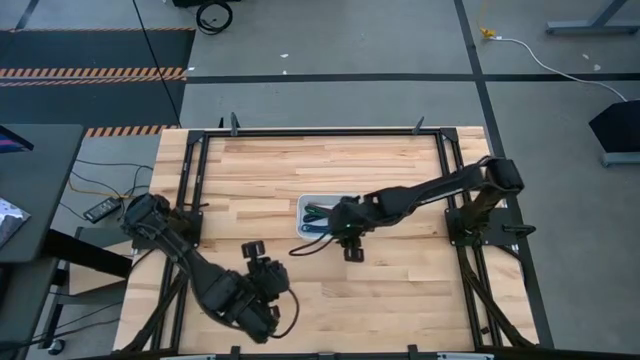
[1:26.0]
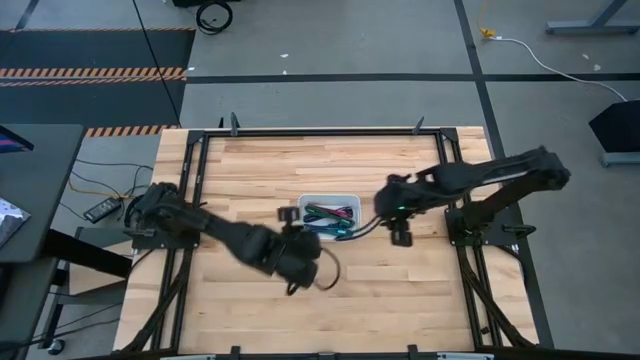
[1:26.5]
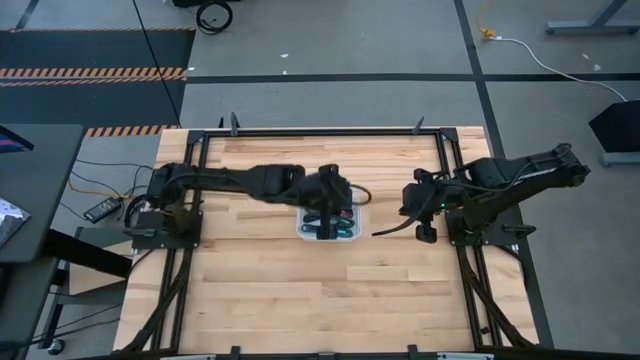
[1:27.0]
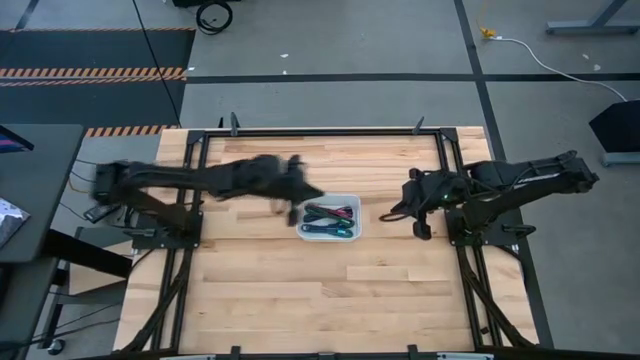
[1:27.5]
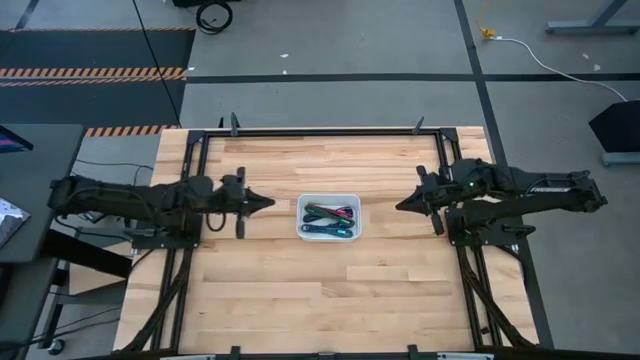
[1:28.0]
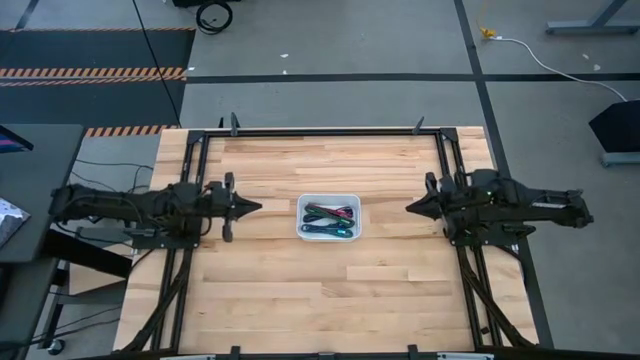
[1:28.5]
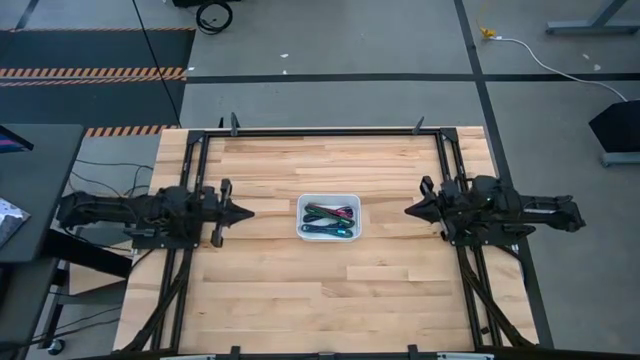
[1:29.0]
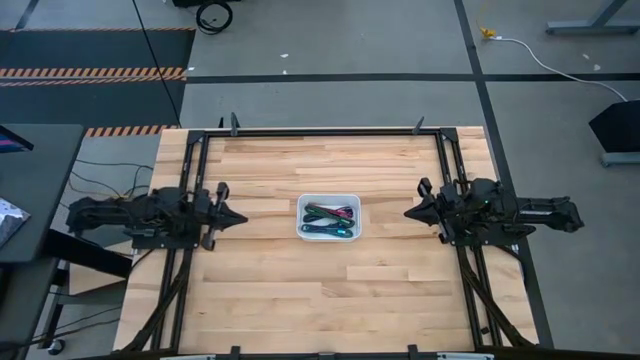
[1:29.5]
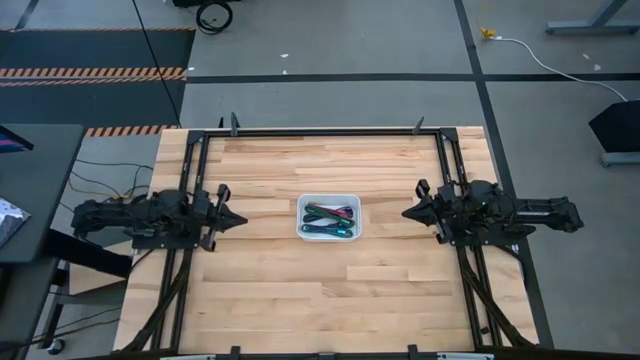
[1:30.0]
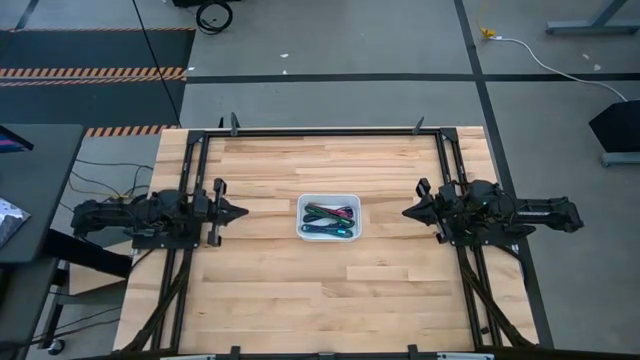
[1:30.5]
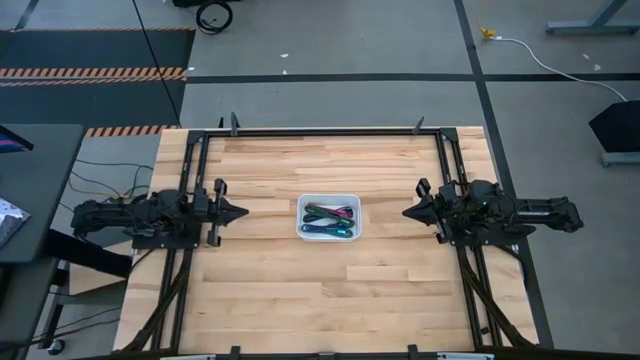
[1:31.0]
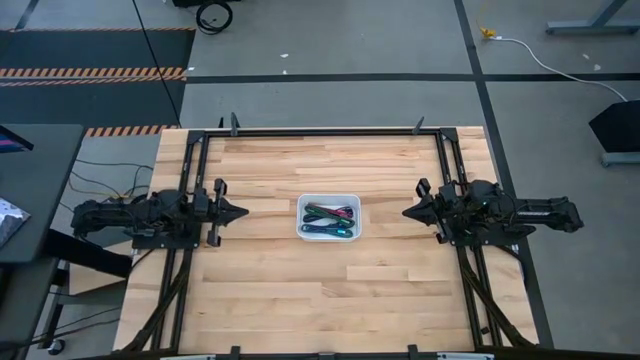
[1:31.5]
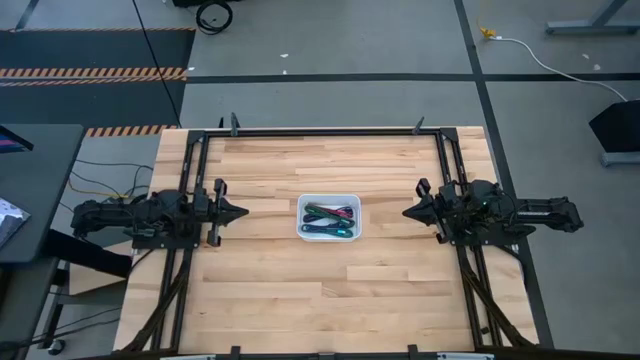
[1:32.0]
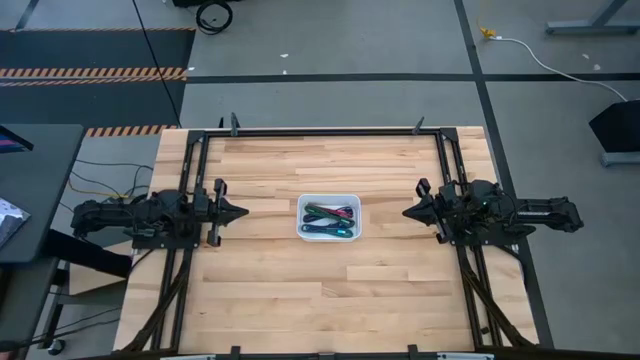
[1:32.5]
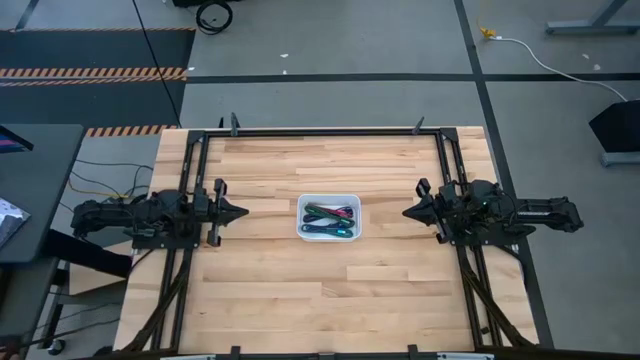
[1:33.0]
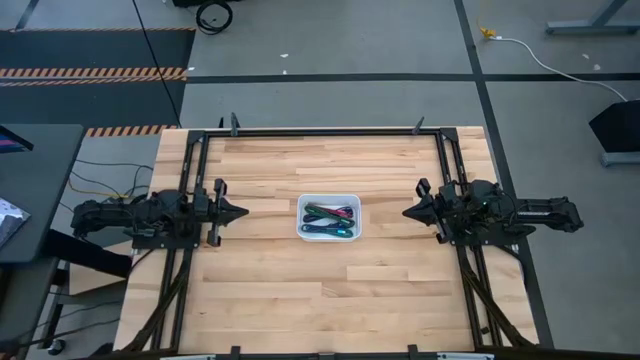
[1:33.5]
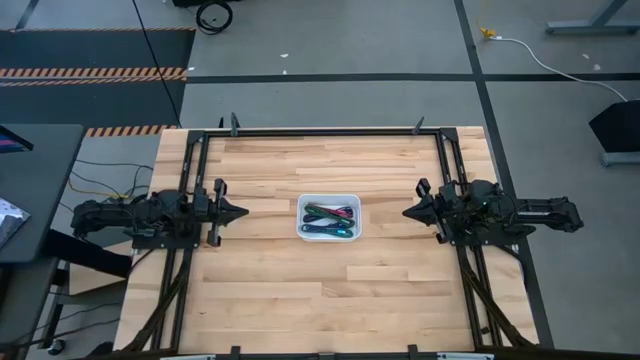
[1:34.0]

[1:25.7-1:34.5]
Task: Pick and place USB-C Cables
Return to Home Position

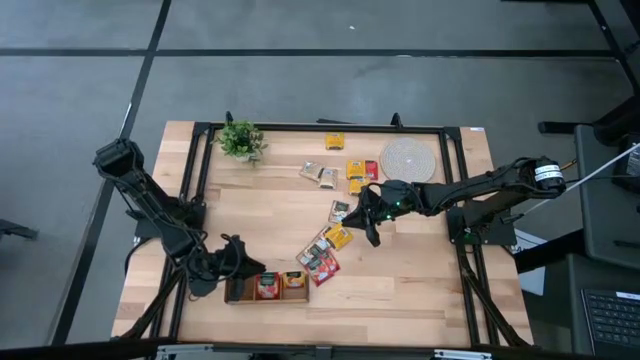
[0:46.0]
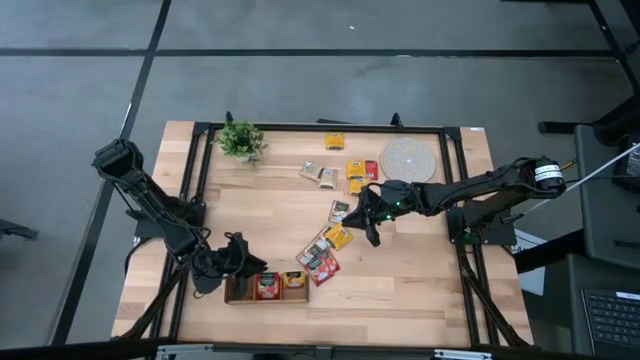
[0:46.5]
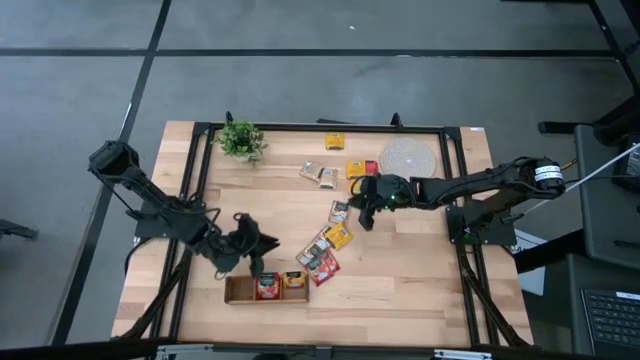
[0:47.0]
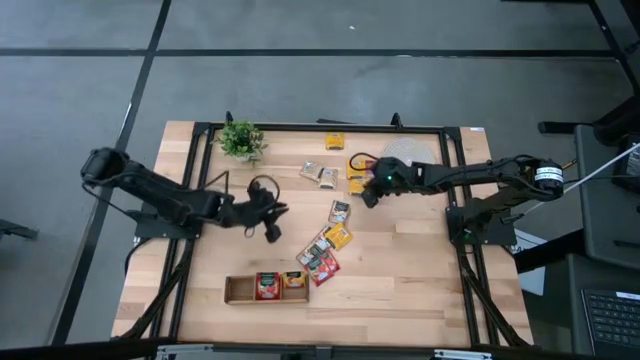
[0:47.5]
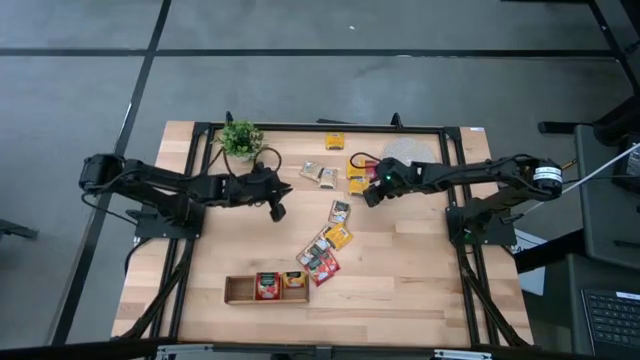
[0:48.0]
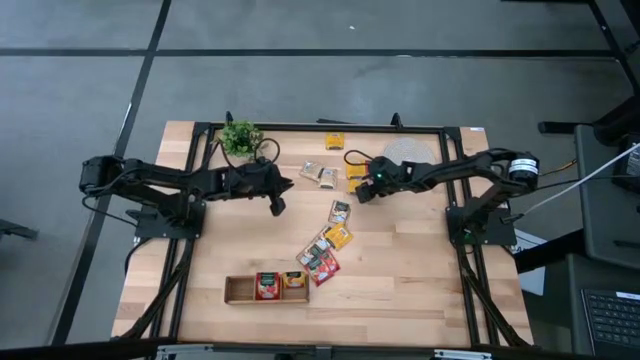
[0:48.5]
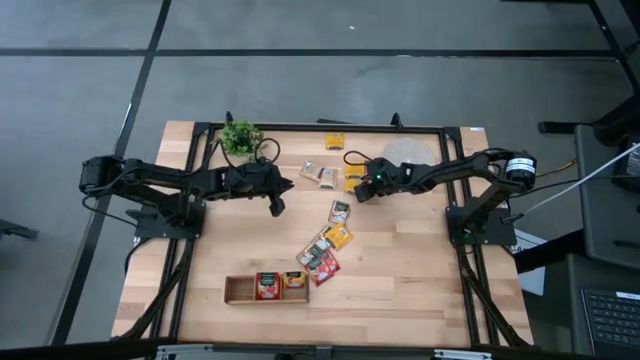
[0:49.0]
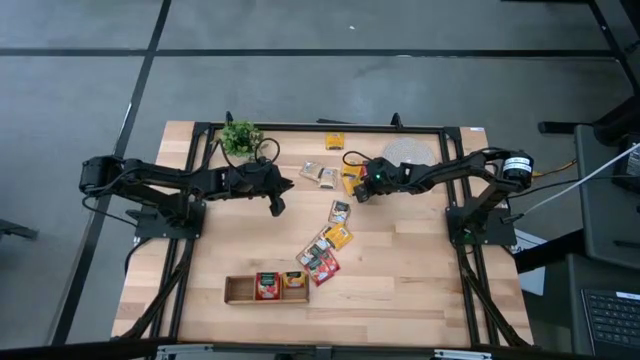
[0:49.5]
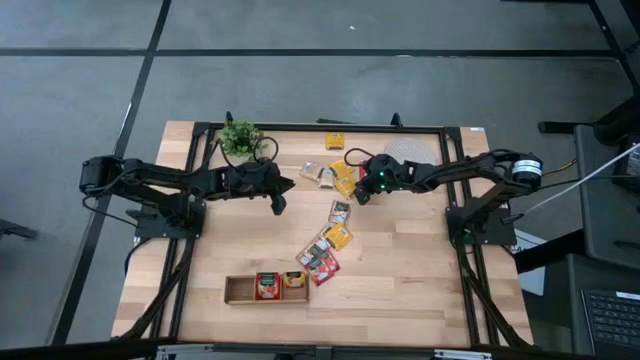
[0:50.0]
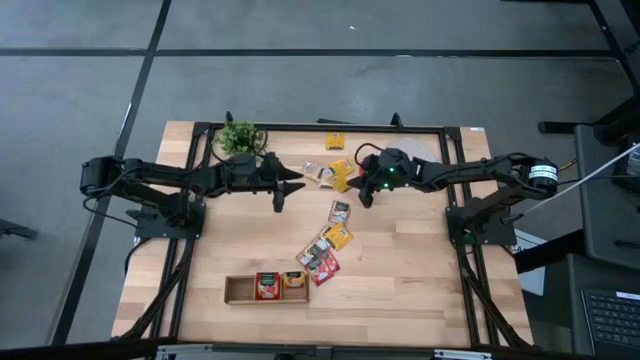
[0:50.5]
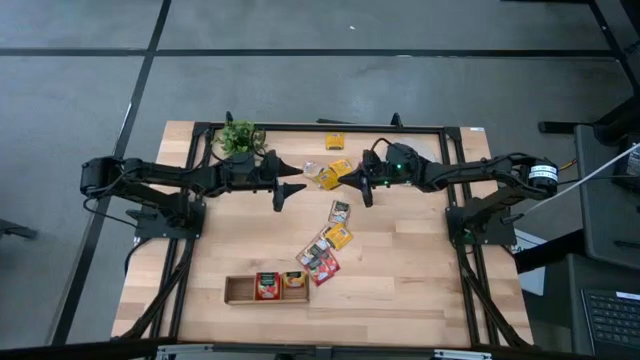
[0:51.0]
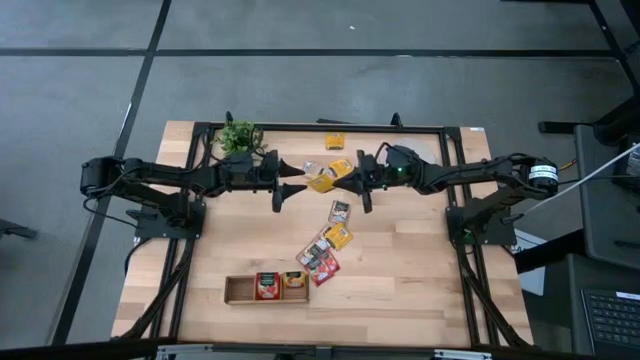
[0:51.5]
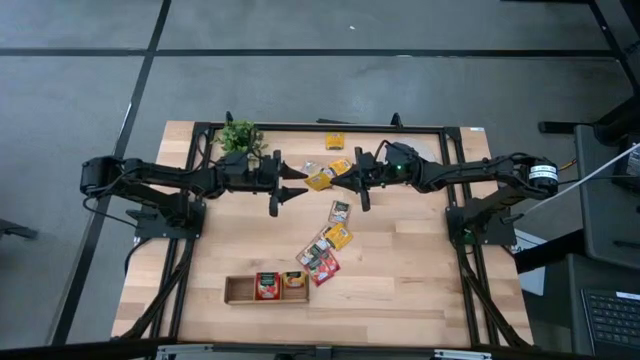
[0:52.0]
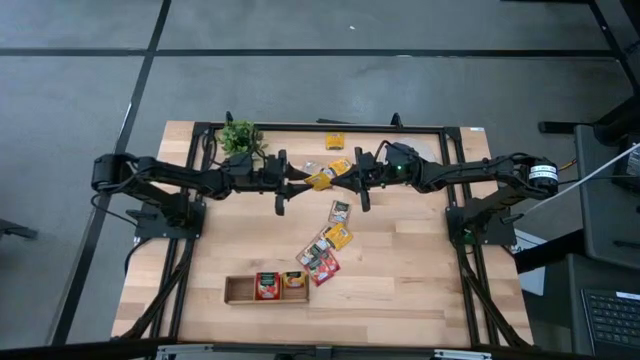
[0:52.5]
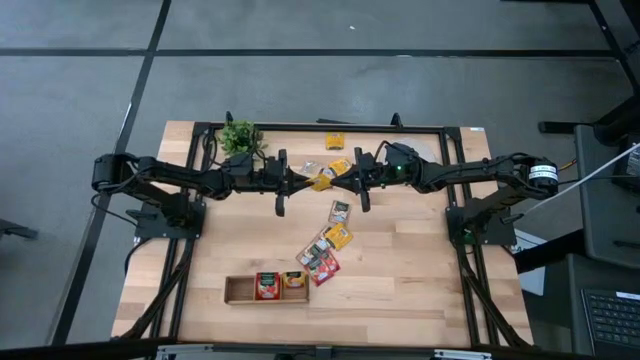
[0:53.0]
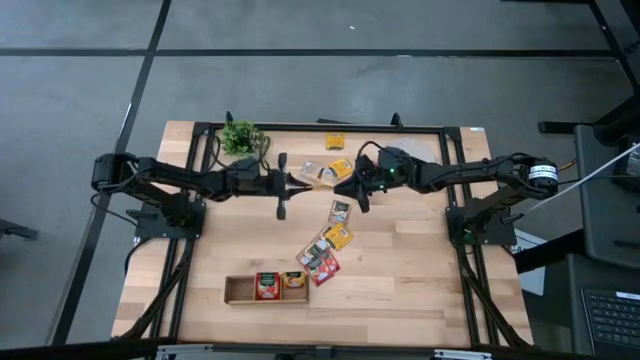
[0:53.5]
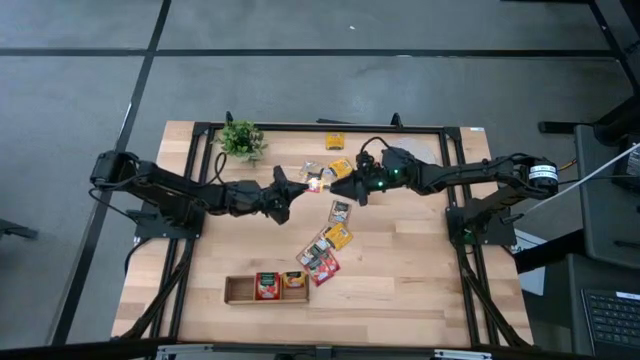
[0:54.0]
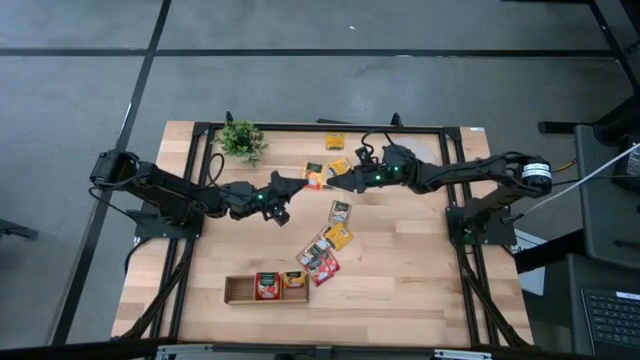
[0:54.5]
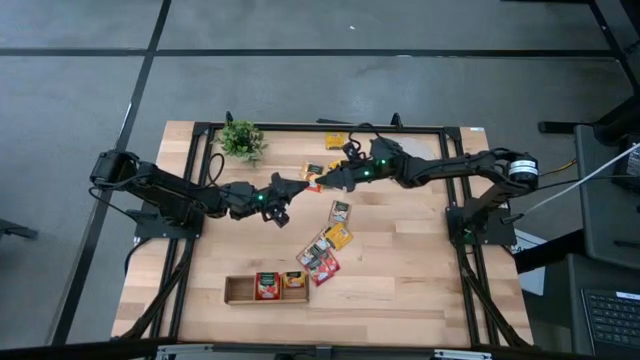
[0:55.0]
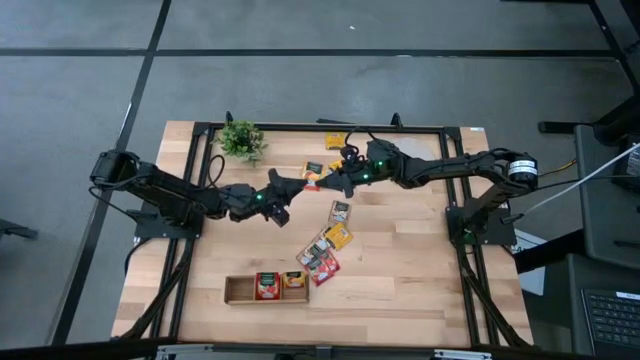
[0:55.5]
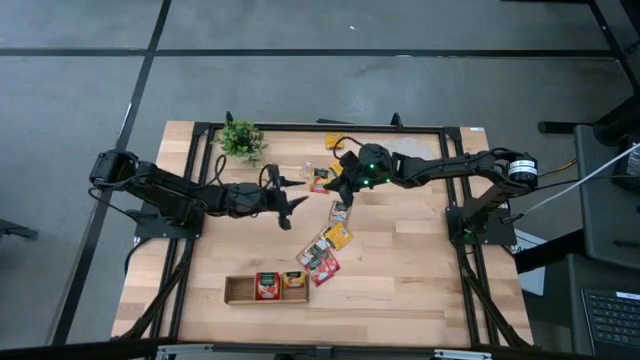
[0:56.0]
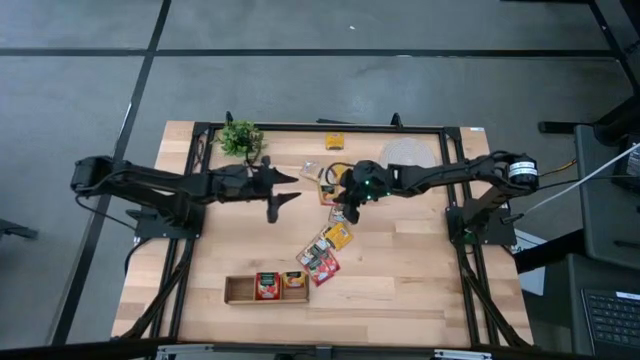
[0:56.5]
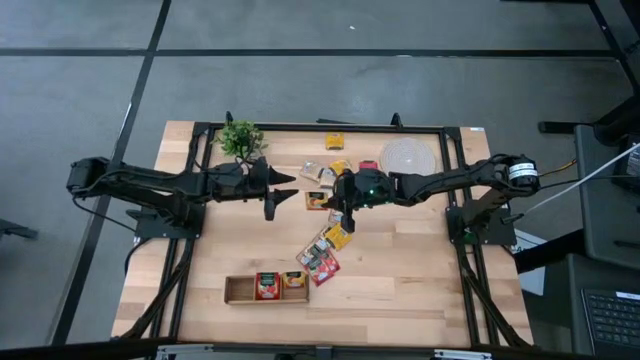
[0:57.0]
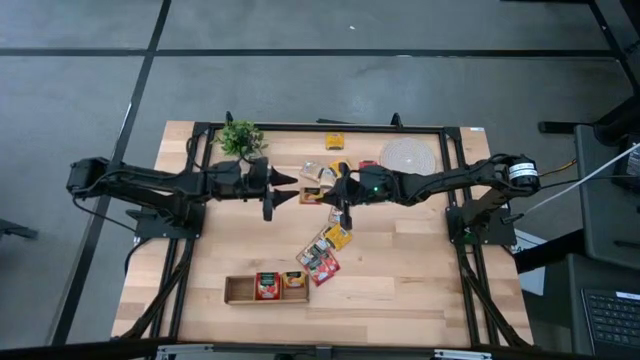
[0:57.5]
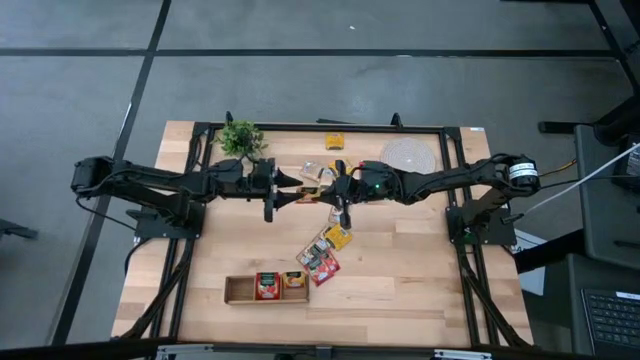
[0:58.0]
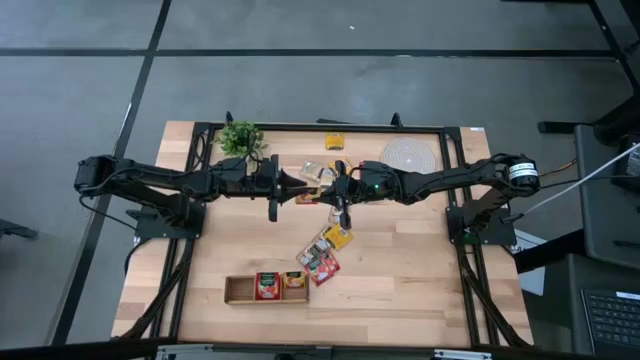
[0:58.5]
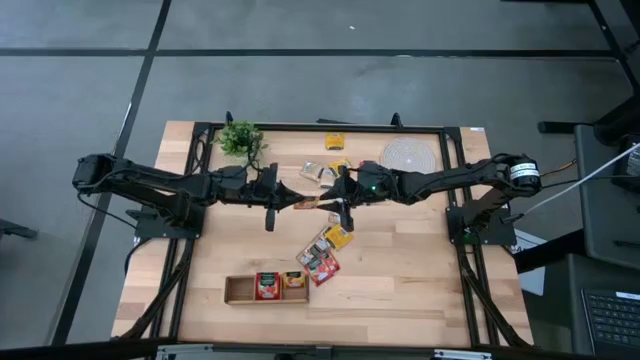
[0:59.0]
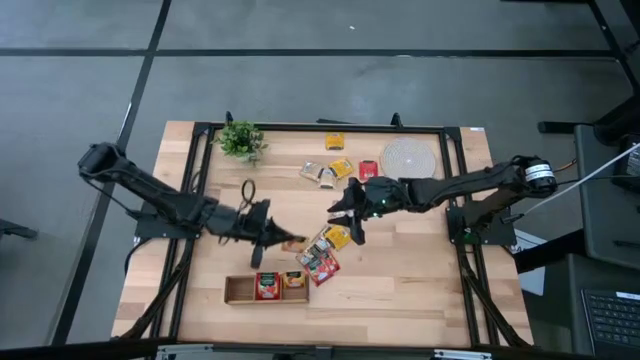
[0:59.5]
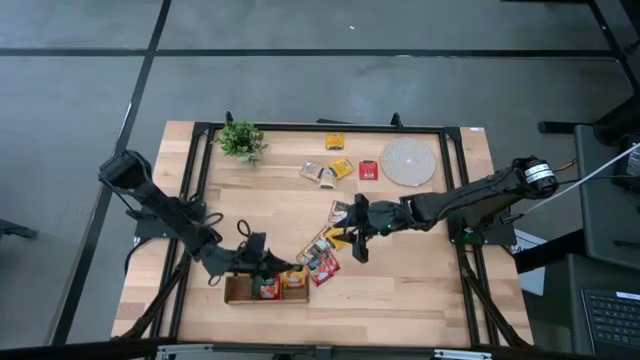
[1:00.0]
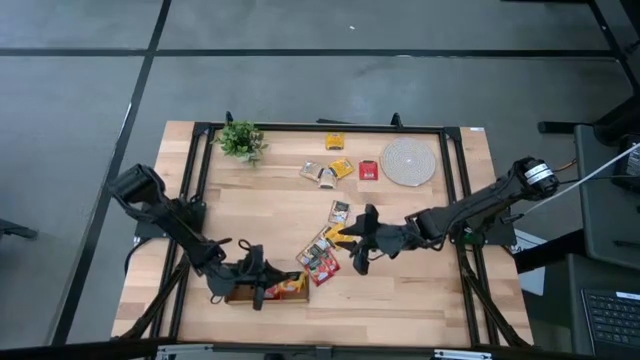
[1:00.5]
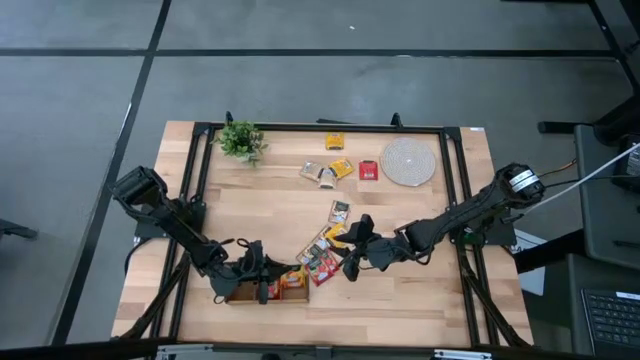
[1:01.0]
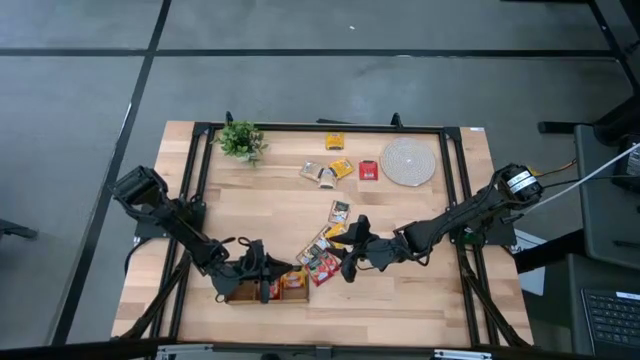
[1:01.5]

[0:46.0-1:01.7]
Task: Pick & Place Tea
Put the yellow tea bag into the right section of the wooden organizer
